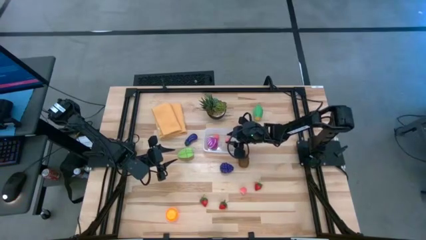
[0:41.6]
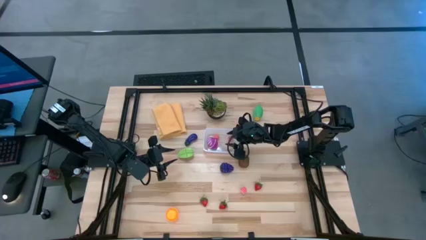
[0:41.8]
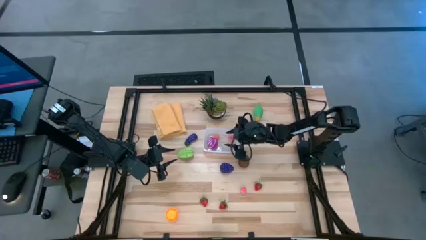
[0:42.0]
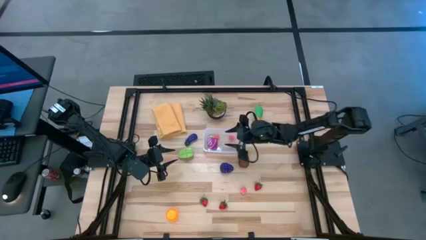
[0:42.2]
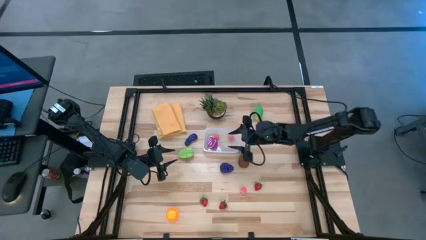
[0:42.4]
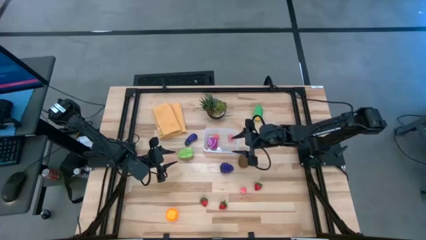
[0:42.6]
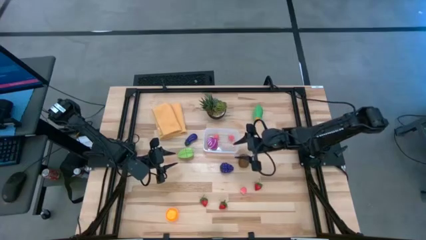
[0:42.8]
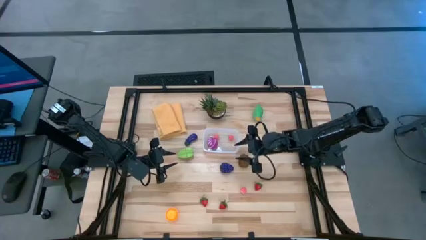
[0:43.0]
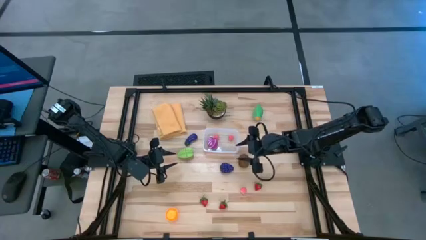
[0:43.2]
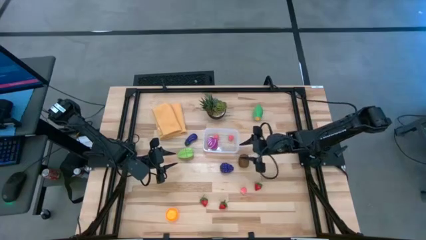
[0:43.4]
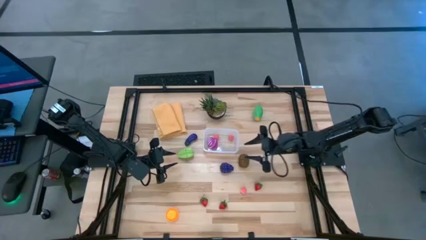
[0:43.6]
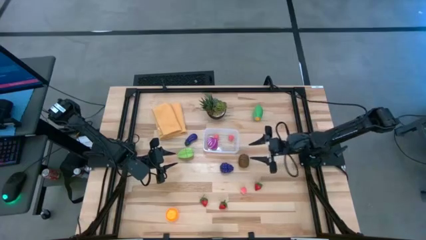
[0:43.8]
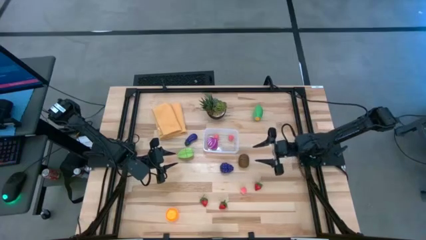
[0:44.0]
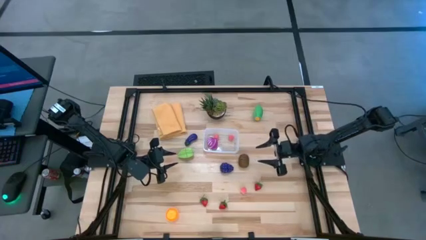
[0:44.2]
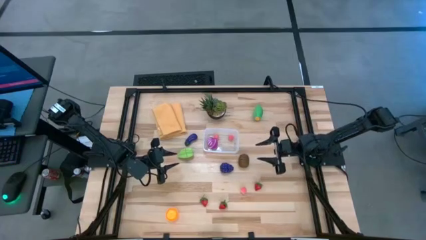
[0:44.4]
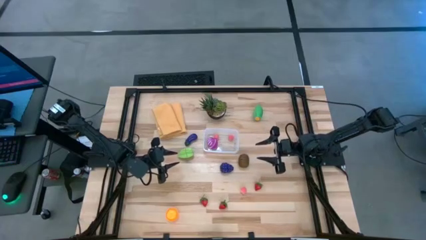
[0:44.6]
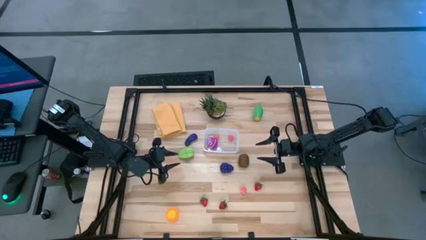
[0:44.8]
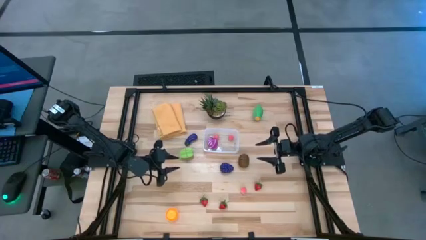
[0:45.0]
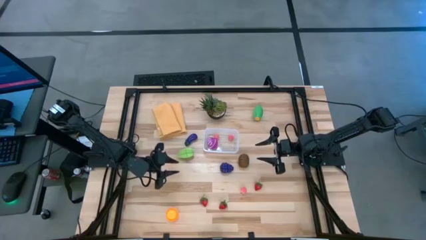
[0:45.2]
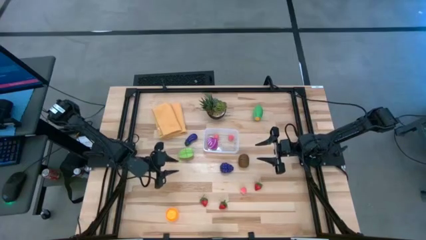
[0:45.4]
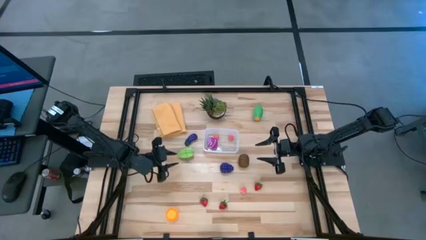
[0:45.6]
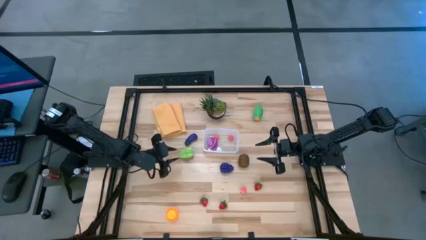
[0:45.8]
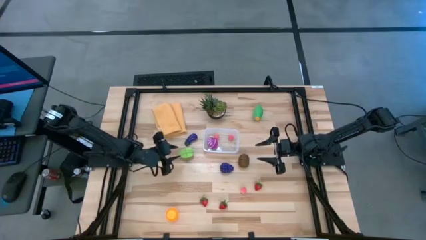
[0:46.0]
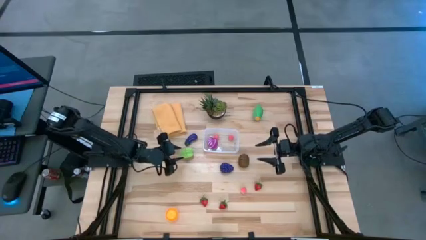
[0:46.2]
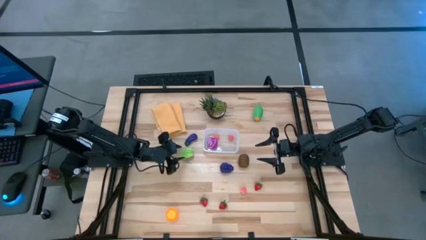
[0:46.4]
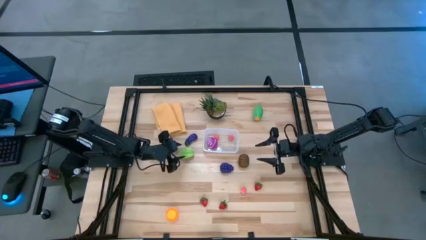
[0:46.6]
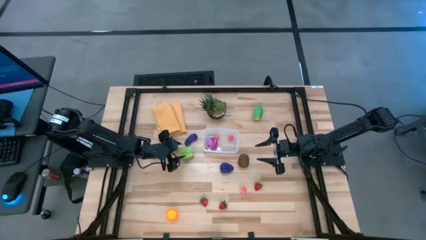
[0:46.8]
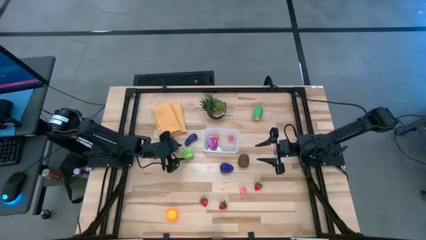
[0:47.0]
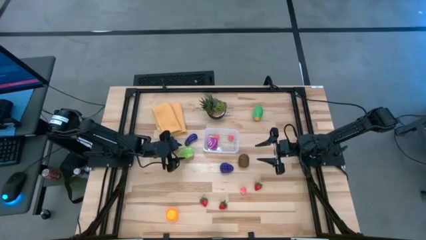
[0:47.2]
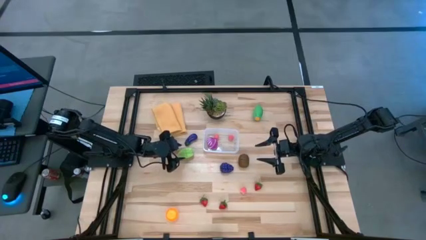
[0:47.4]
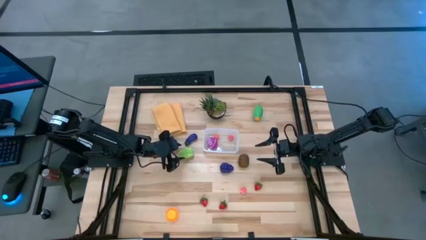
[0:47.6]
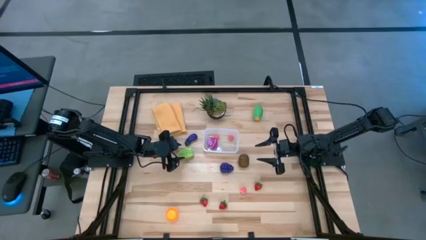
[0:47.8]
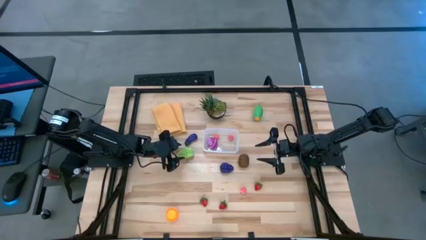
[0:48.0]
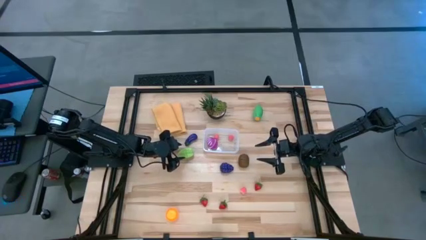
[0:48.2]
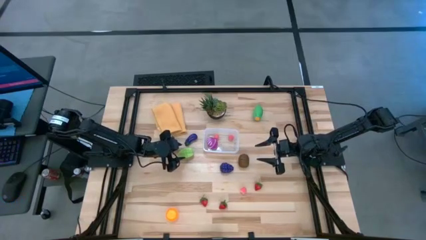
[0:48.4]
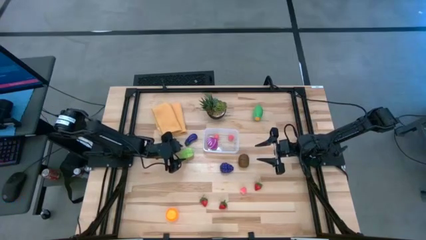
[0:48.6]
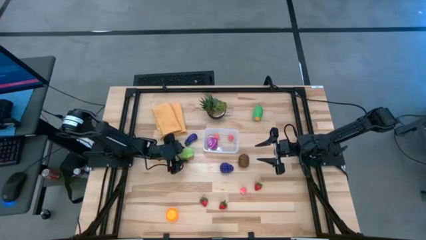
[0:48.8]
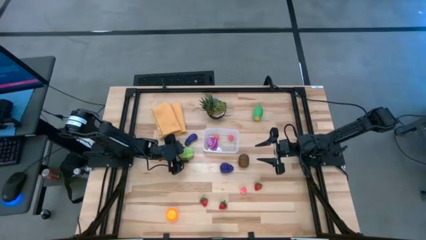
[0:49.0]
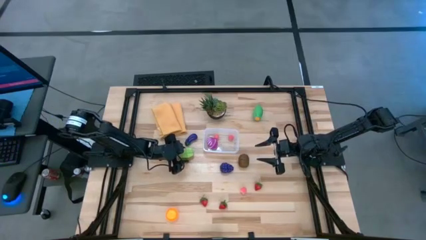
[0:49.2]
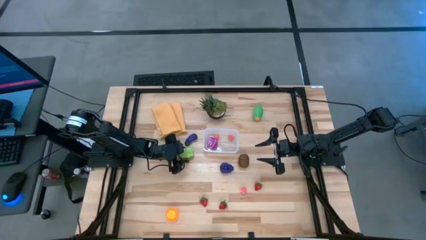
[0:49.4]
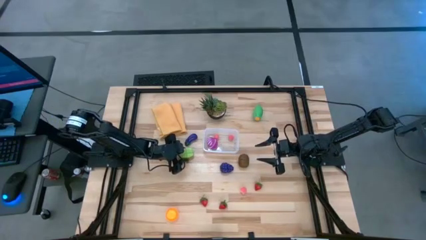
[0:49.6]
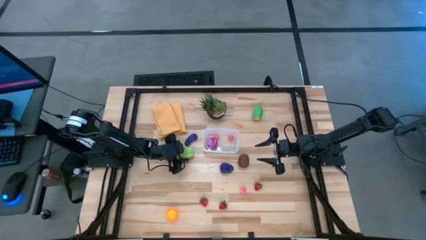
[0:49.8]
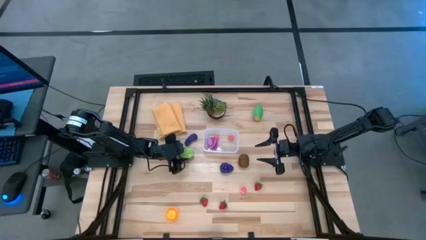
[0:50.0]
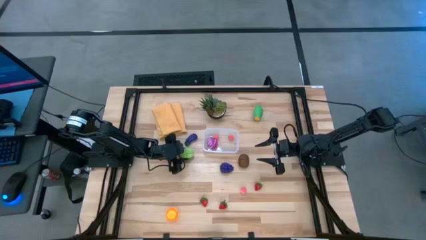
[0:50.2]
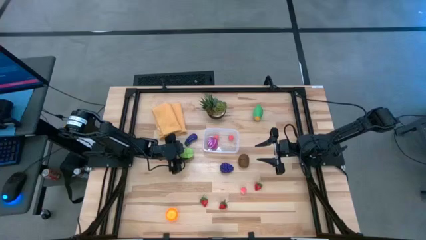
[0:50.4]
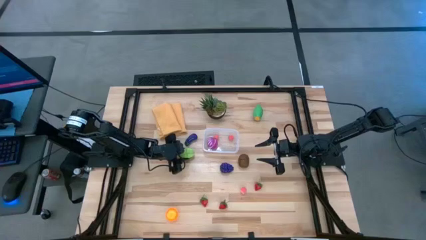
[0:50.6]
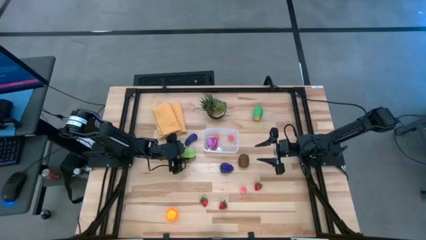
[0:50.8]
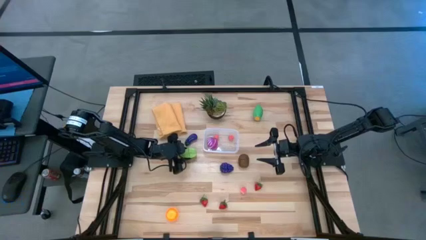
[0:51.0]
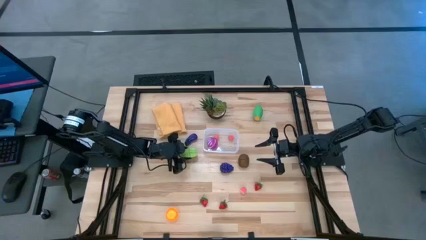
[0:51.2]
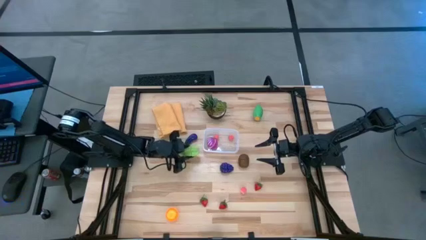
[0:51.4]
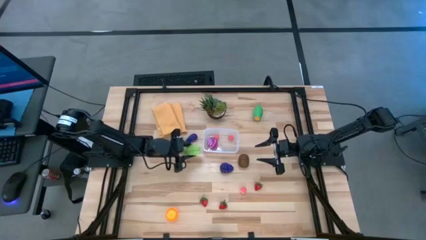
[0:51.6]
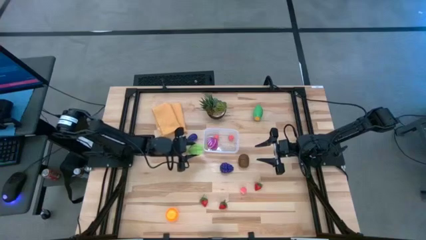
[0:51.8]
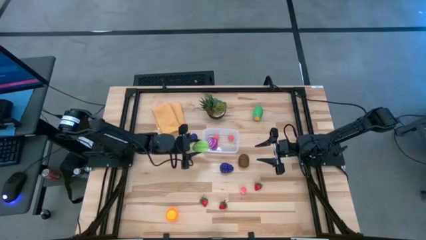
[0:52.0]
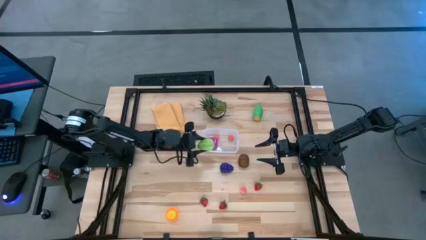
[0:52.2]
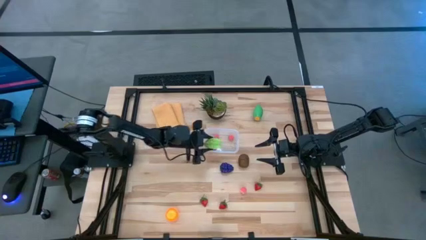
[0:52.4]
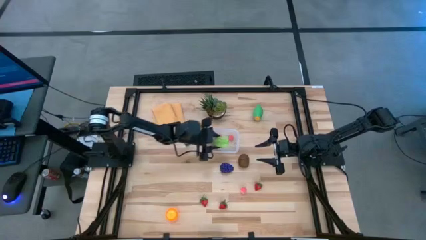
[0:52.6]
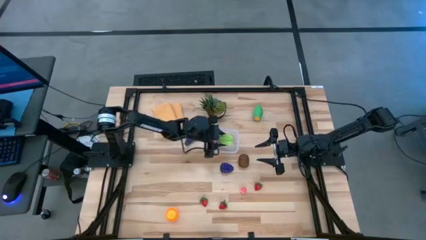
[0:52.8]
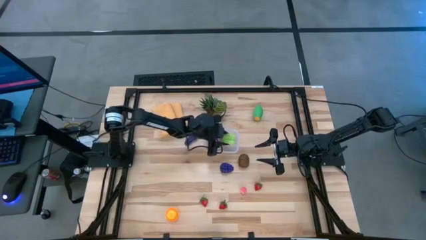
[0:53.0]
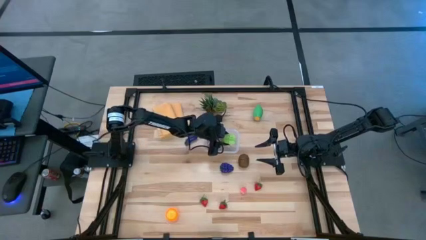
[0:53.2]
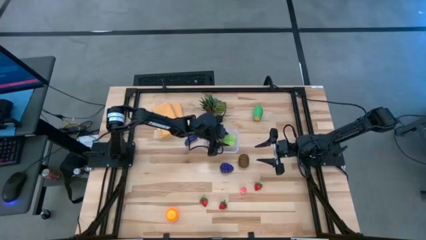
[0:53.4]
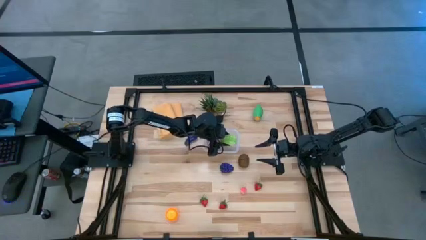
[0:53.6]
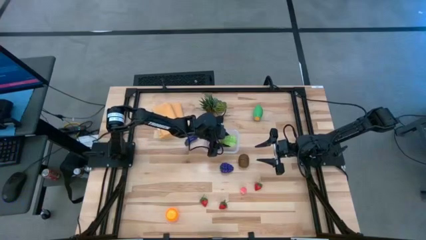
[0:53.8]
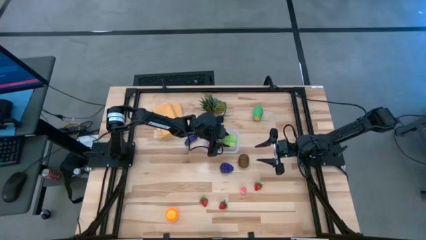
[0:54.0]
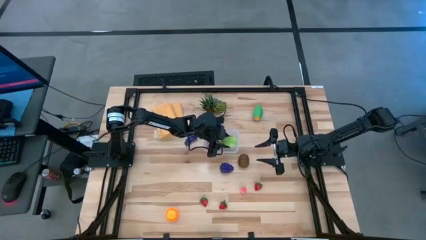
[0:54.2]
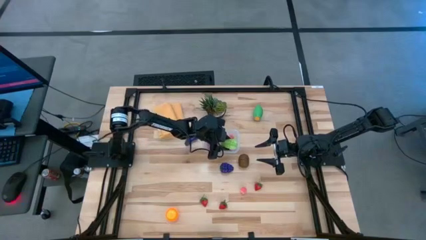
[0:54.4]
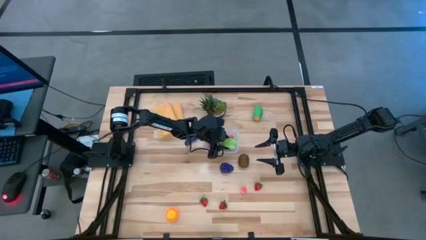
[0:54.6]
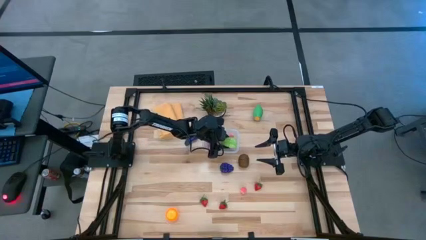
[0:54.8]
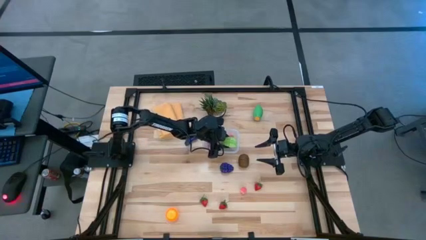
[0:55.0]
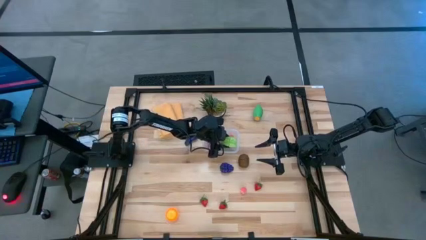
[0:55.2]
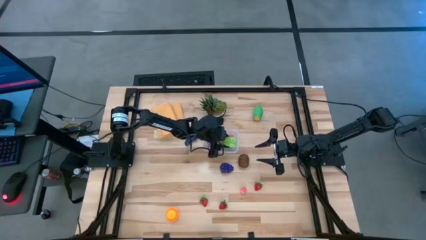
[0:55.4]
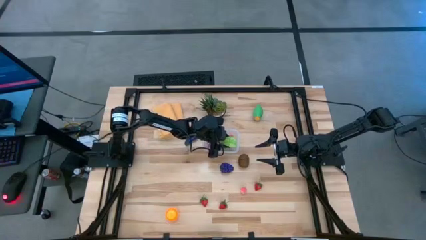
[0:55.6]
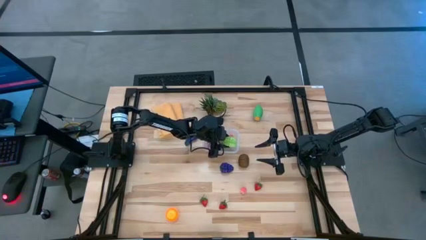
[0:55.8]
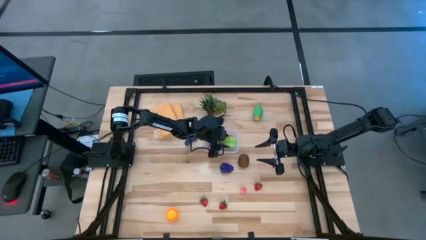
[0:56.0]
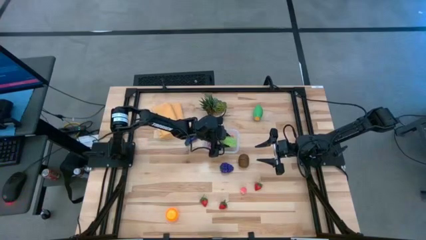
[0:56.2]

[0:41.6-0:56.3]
Task: Pick and placing Produce into tupperware
Put the green starfruit into the transparent container
